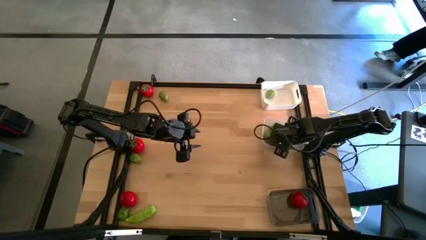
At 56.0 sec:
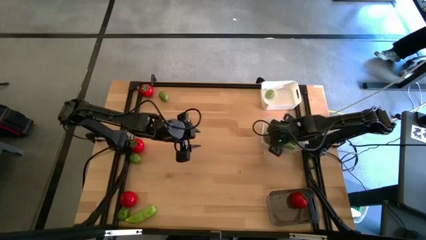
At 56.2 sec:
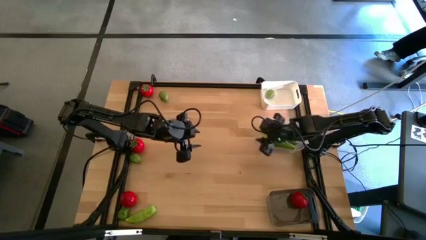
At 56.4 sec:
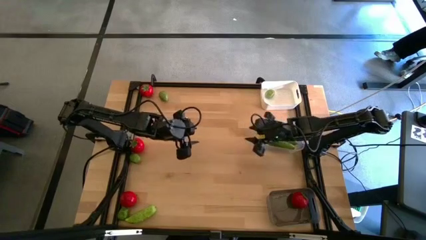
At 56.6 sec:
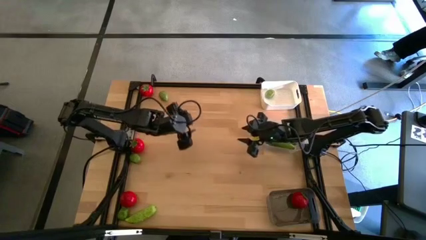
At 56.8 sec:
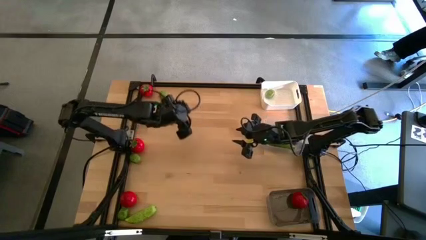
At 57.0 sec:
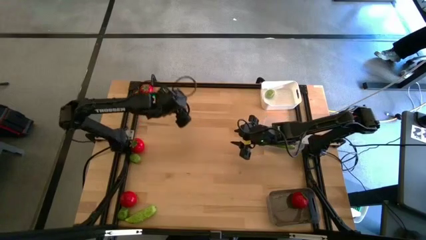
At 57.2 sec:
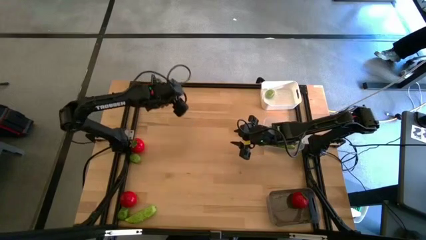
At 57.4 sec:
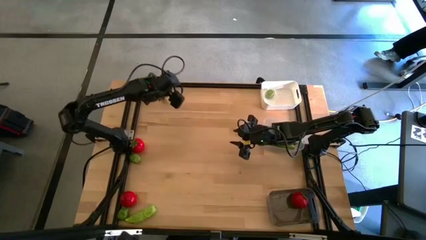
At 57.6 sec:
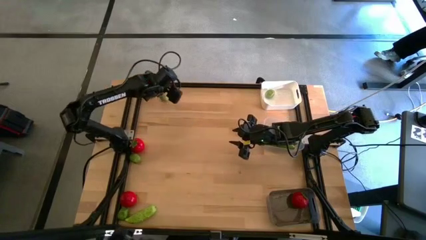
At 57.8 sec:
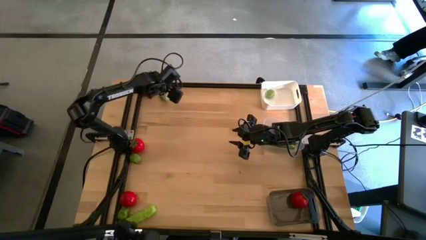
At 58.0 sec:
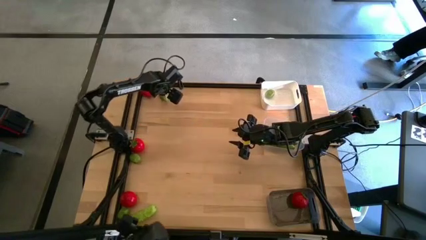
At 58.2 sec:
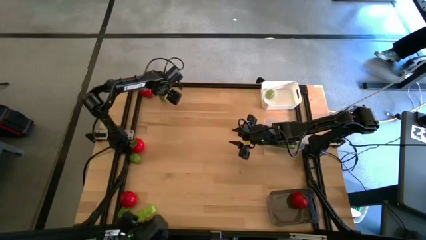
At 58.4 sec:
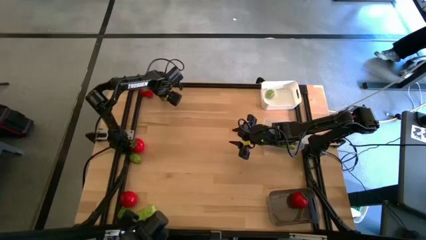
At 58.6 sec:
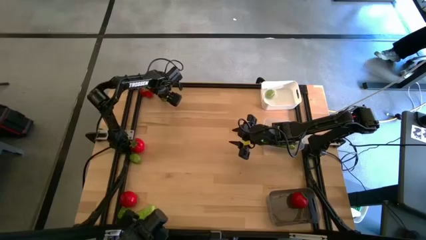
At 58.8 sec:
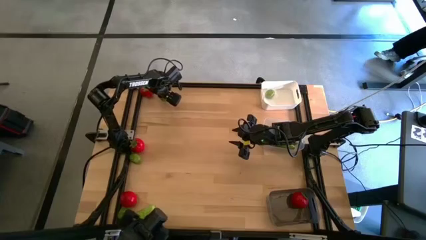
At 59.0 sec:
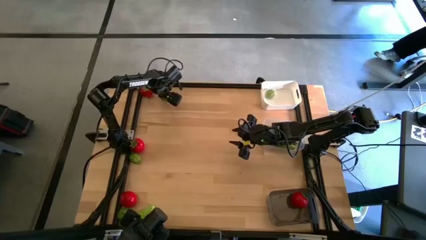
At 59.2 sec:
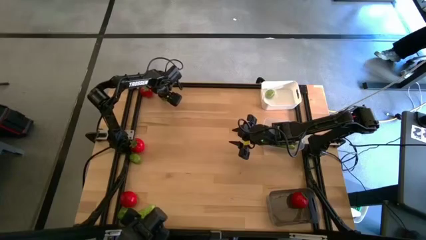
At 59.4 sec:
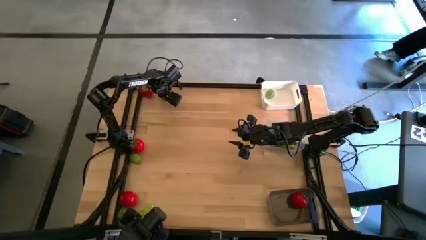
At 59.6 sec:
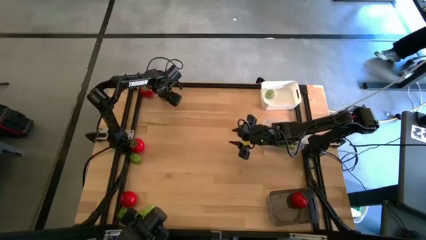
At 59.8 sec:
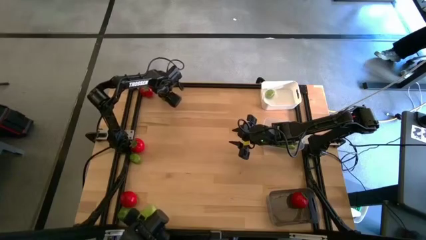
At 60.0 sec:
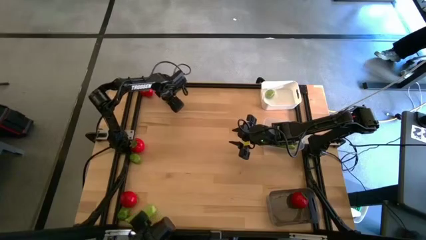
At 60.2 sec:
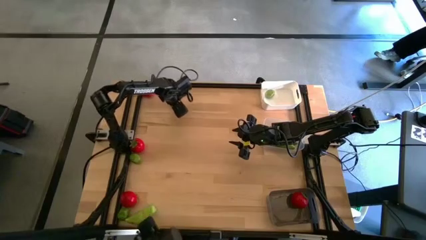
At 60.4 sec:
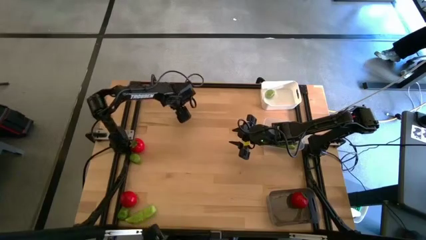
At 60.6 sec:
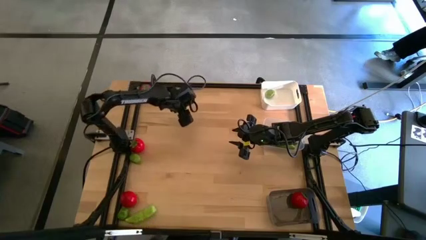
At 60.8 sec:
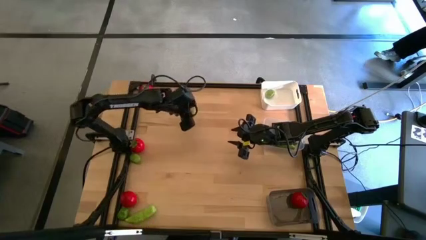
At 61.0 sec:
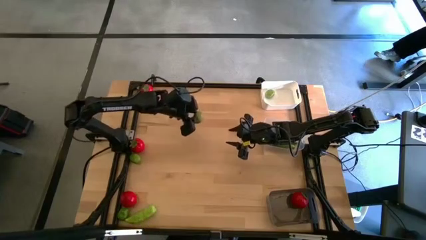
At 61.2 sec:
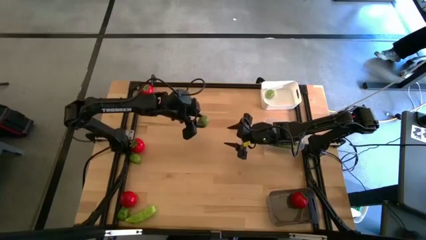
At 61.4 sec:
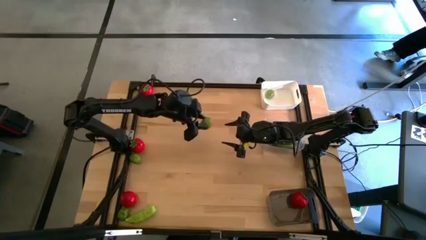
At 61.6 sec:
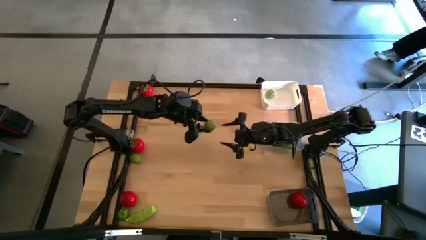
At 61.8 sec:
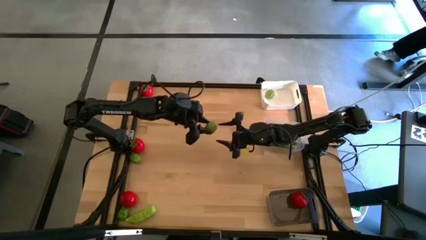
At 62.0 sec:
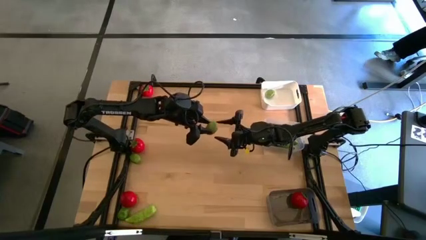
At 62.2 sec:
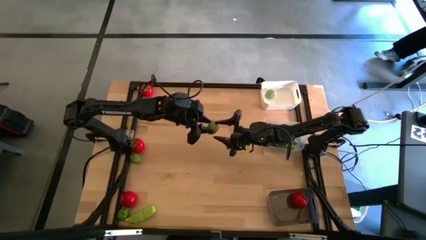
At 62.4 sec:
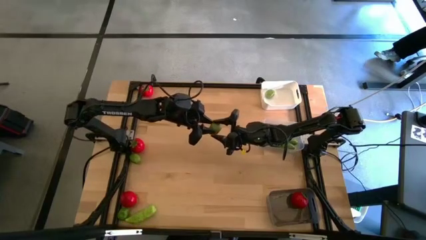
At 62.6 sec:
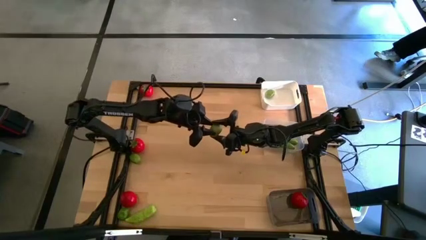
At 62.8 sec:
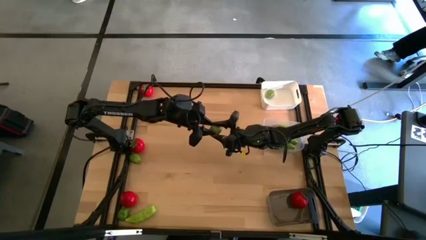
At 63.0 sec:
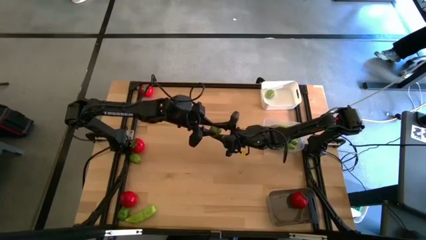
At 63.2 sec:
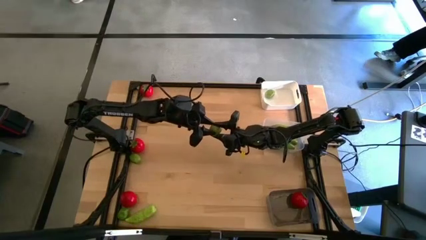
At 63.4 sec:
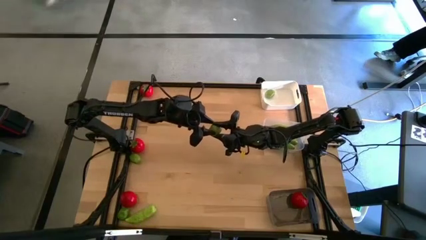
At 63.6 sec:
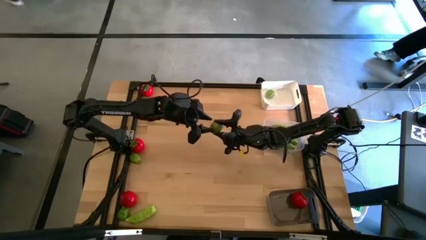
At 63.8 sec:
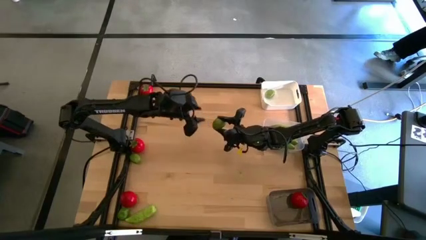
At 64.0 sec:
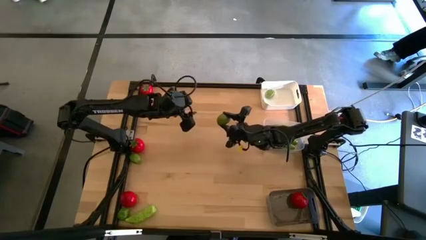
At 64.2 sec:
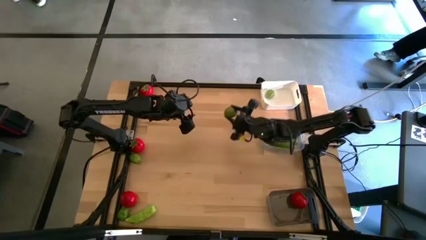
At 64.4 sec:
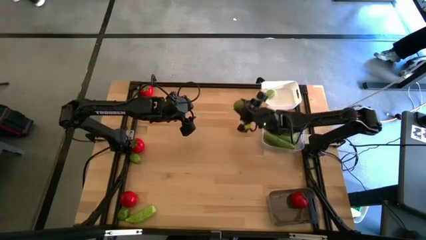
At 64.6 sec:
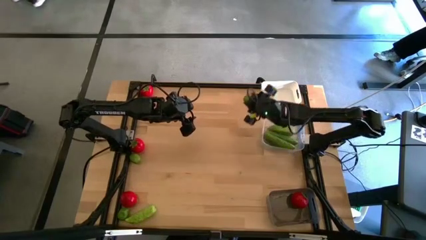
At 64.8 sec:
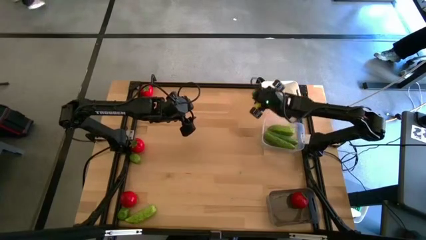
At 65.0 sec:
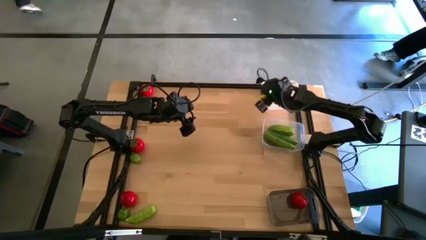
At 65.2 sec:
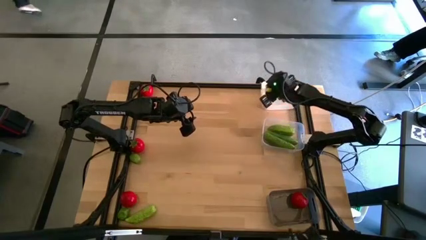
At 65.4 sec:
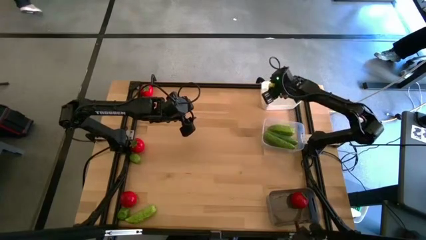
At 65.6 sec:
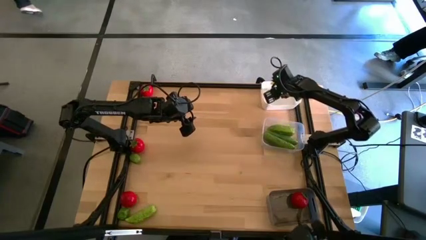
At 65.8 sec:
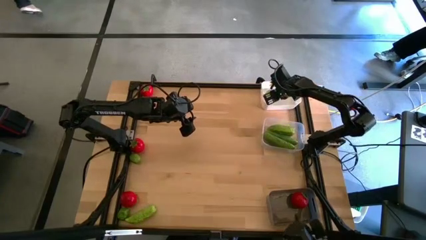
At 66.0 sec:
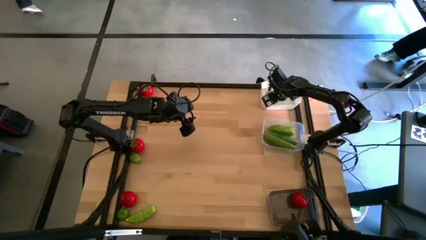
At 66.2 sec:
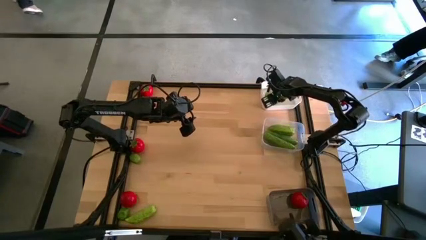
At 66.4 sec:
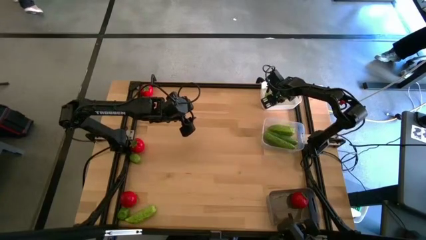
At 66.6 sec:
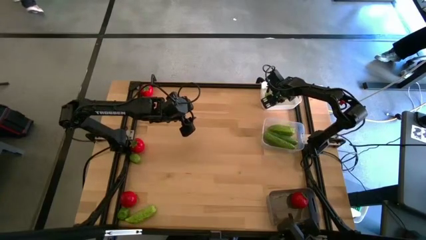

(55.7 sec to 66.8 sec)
Task: Sort produce into baskets
Put the top lime into the white bin
